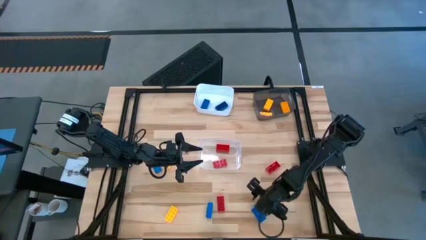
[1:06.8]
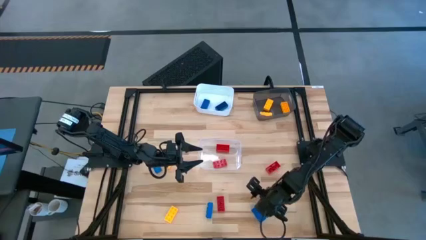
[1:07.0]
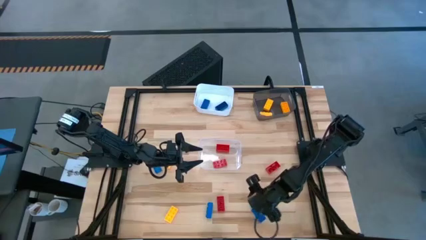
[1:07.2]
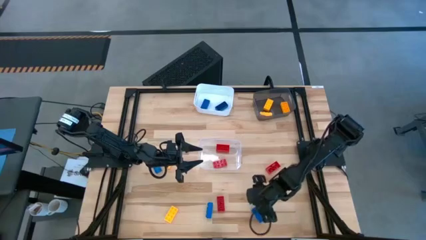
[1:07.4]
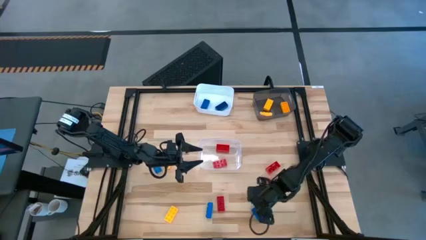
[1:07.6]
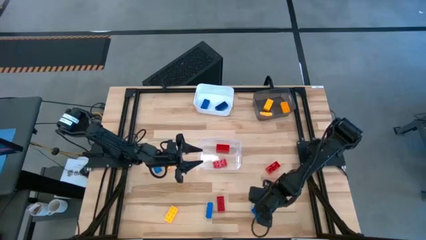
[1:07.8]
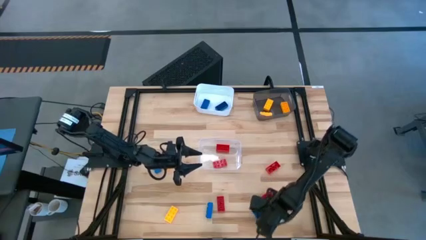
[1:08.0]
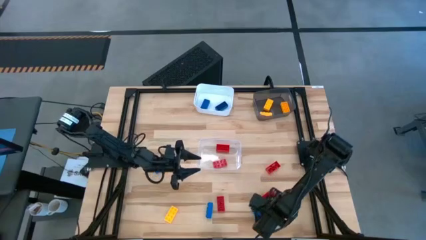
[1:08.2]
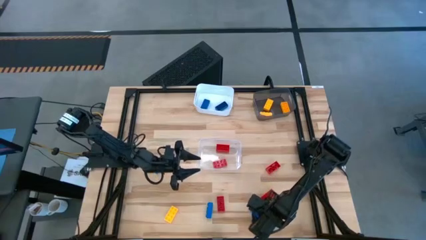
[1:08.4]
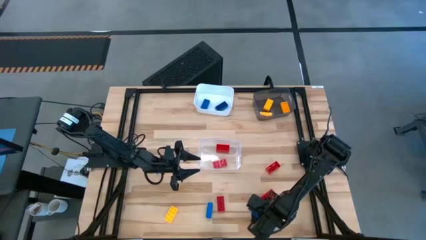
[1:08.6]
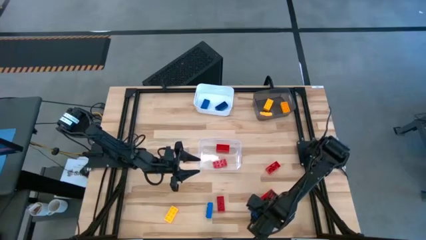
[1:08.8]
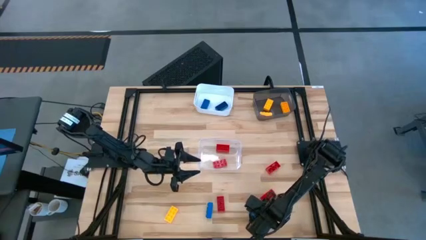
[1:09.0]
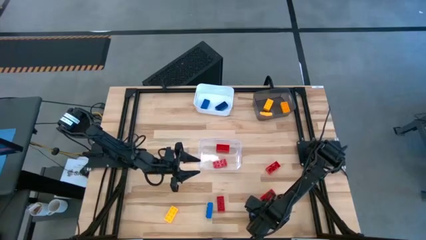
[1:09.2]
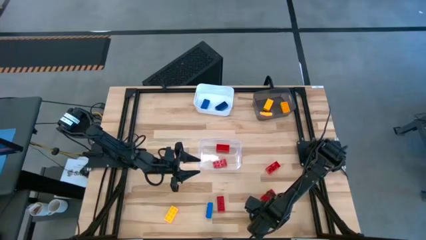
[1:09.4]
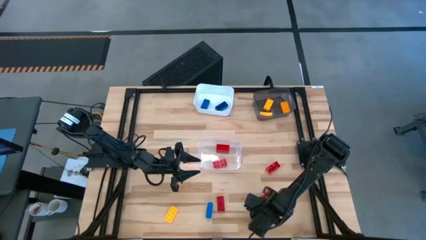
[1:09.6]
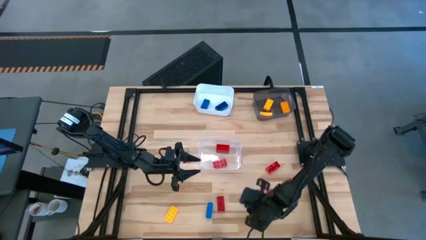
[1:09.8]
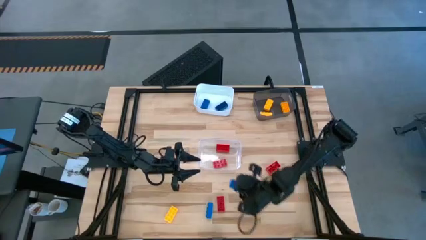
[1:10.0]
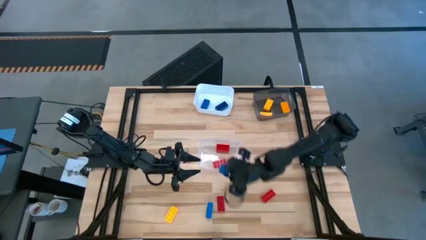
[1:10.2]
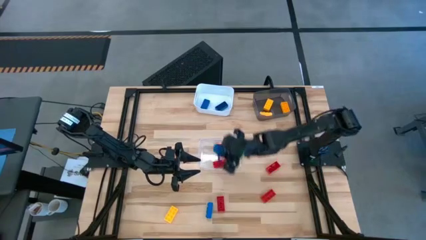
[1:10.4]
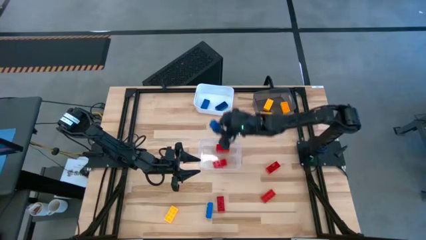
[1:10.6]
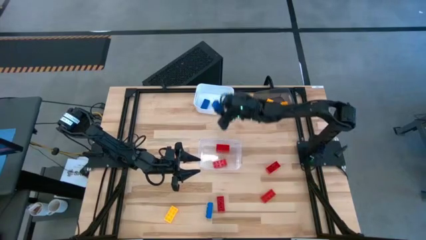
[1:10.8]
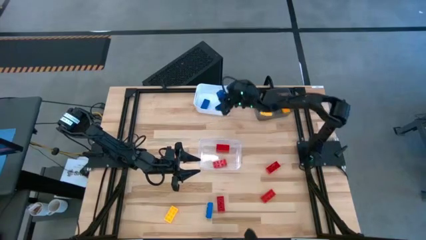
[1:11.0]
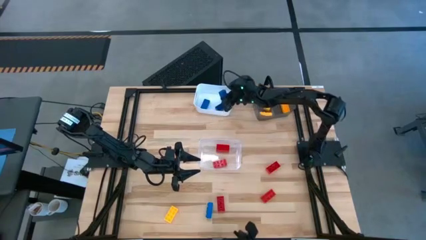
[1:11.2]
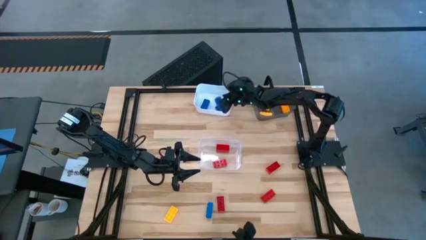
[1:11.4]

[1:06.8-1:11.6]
Task: Sort & place blocks by color
Put the bottom left blue block into the white bin

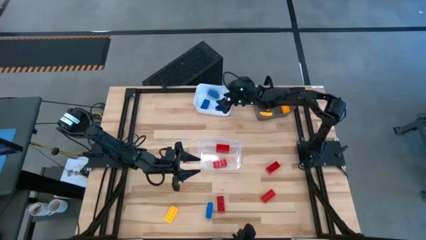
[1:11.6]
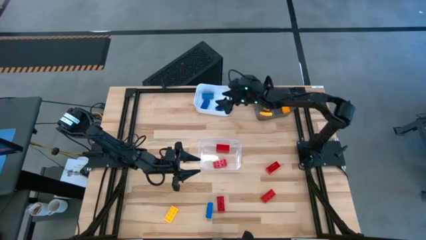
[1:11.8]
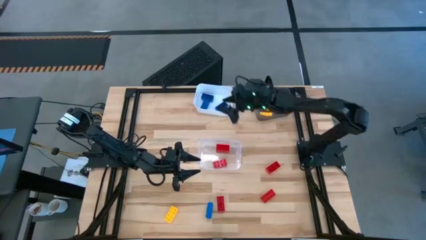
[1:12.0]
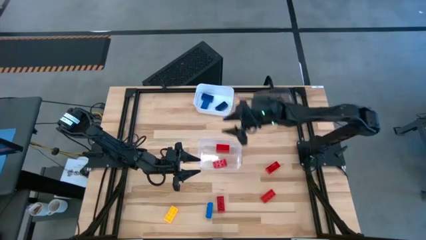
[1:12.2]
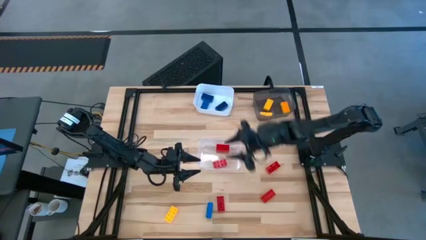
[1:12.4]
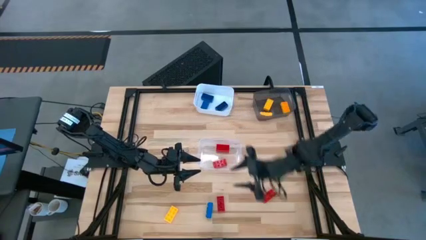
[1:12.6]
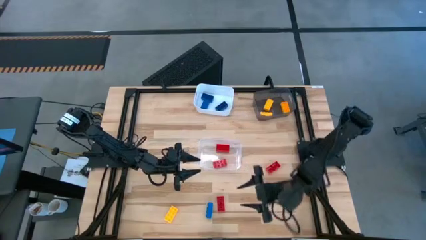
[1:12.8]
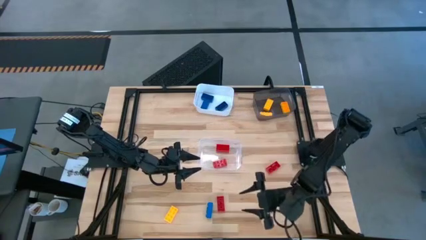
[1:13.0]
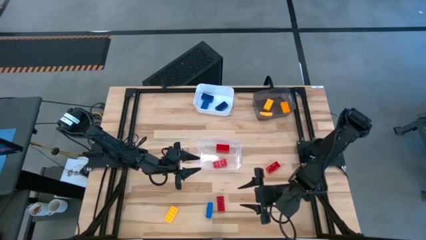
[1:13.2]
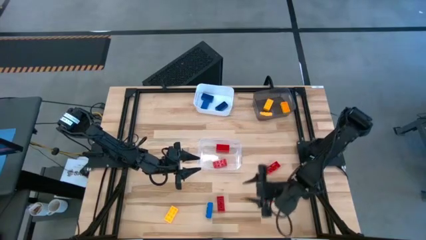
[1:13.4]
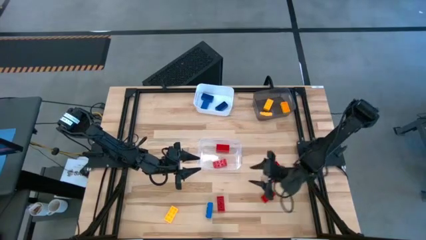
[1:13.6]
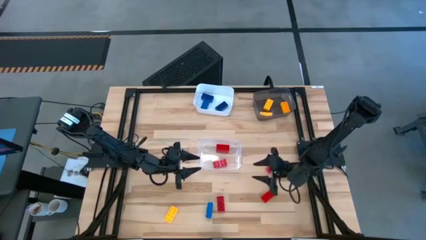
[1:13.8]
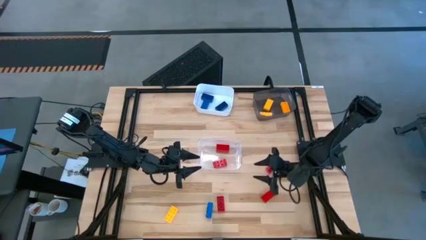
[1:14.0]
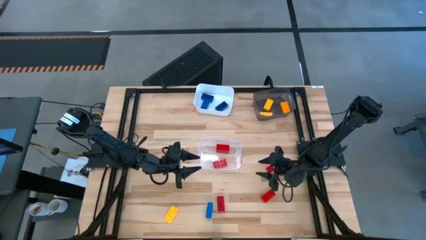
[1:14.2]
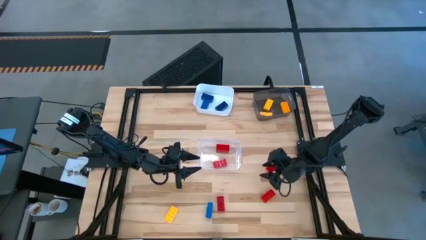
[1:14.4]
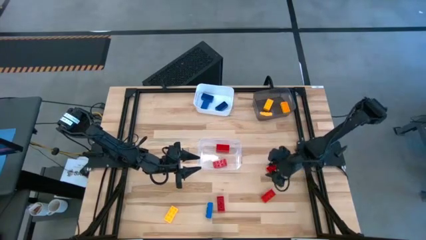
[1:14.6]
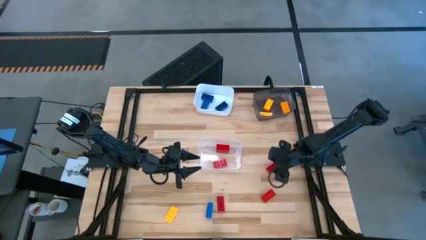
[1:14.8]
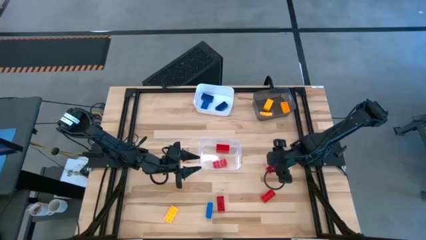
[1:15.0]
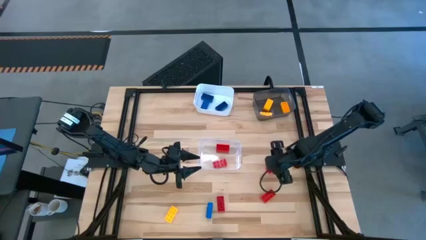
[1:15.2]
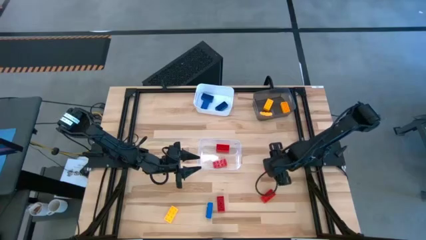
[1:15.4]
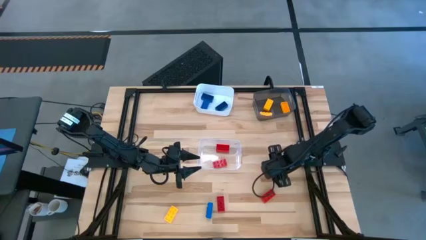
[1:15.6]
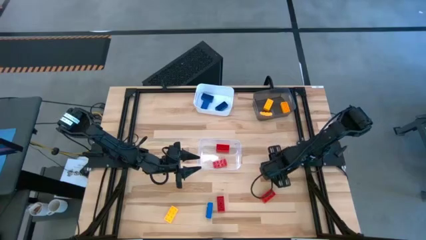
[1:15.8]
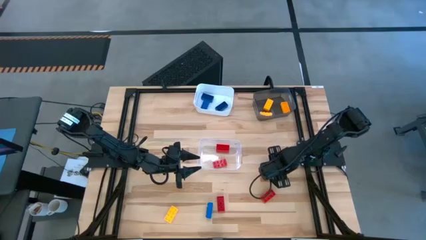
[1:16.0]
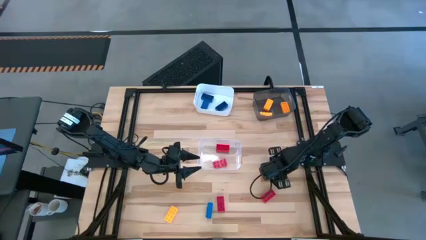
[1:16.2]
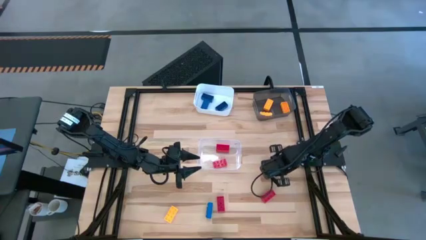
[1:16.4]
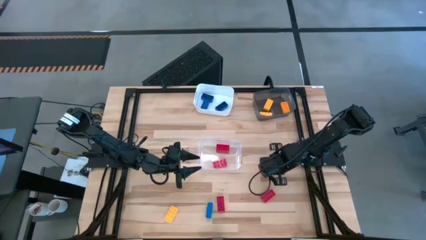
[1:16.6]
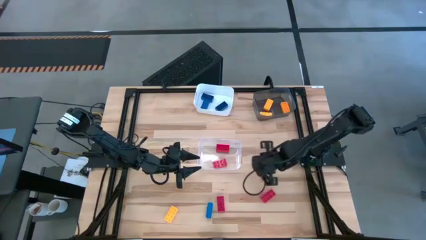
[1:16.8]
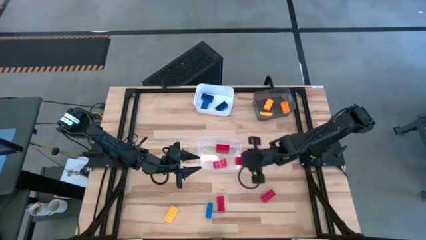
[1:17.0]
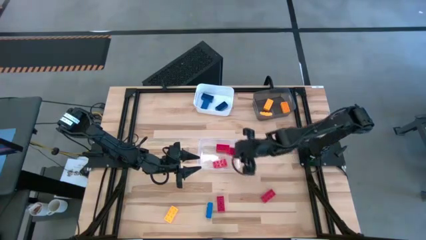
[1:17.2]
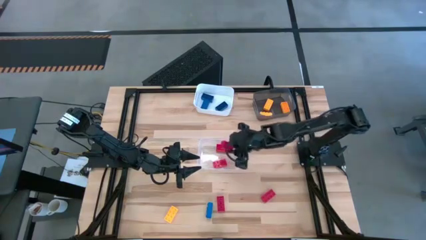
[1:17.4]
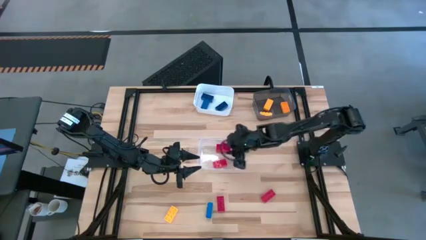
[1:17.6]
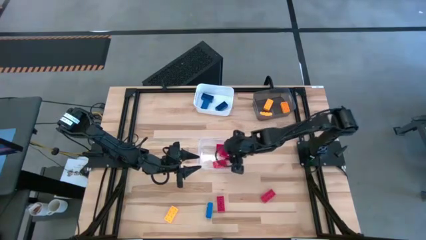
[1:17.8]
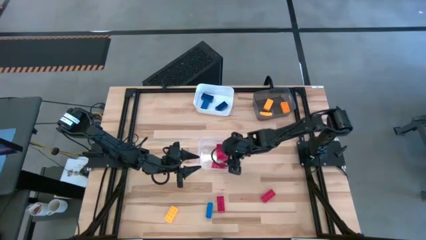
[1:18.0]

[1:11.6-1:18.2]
Put the top right red block into the transparent bin

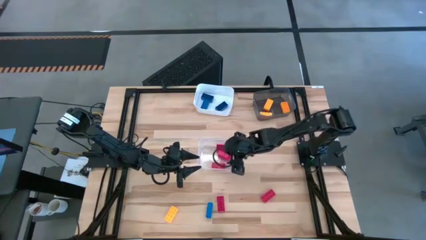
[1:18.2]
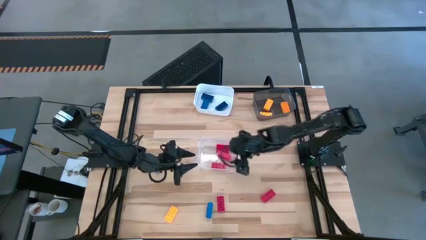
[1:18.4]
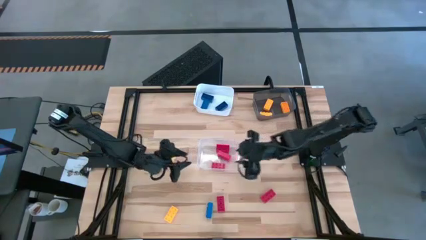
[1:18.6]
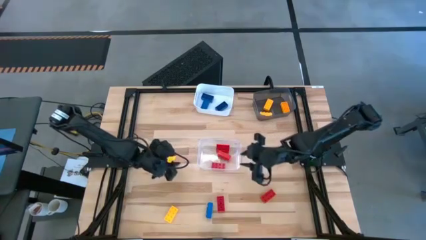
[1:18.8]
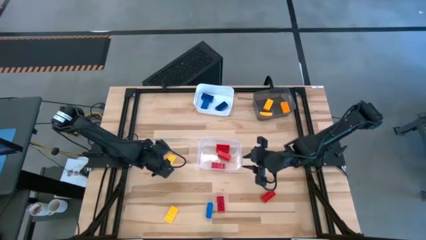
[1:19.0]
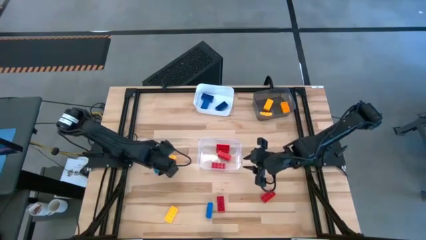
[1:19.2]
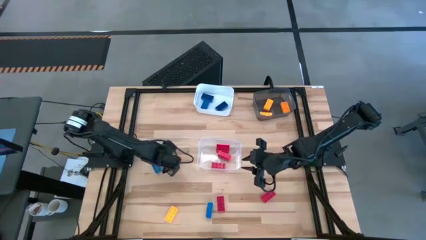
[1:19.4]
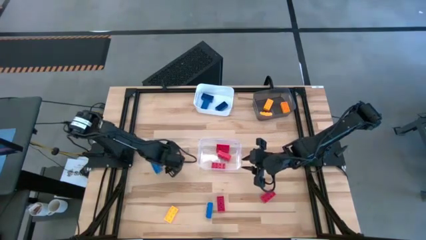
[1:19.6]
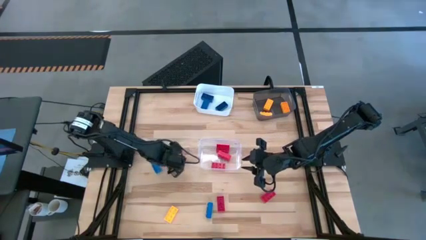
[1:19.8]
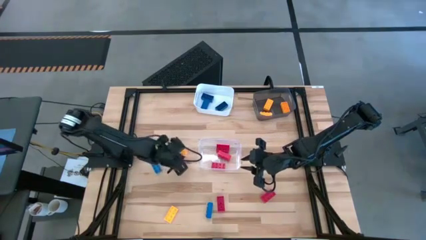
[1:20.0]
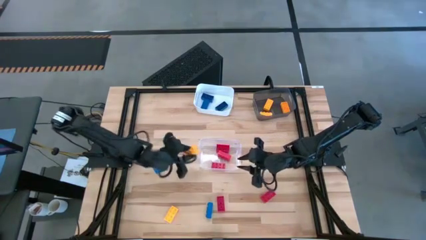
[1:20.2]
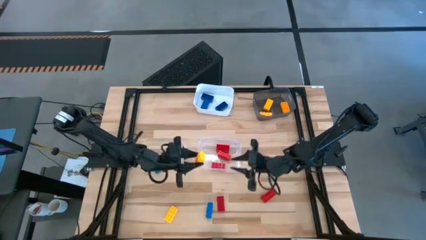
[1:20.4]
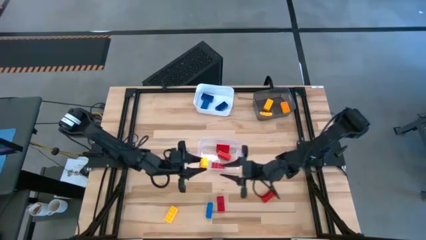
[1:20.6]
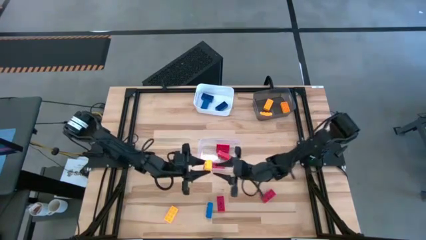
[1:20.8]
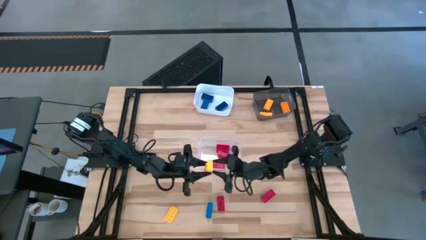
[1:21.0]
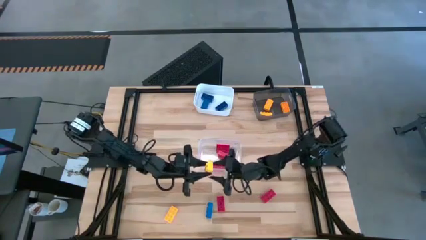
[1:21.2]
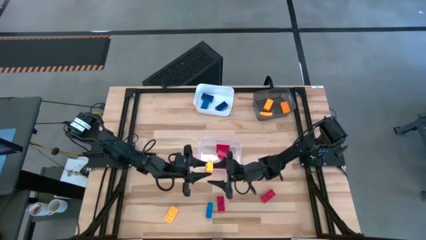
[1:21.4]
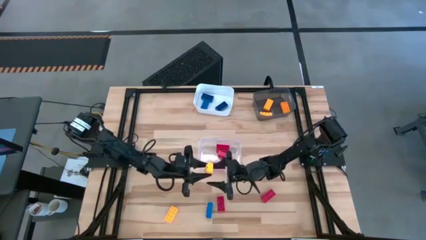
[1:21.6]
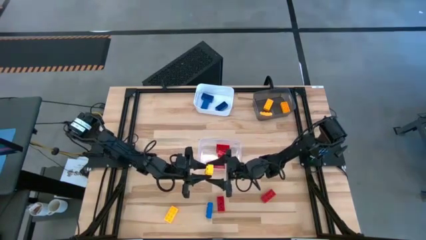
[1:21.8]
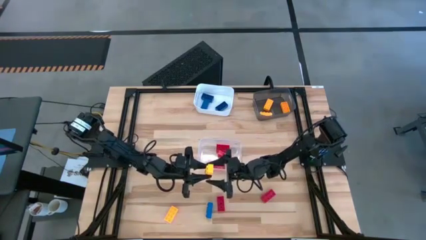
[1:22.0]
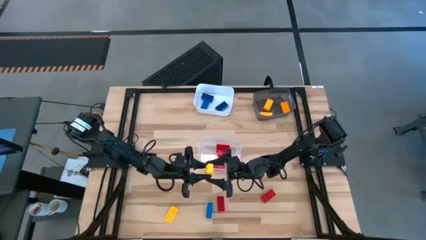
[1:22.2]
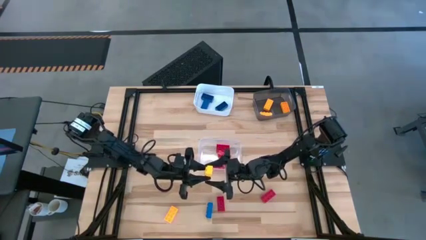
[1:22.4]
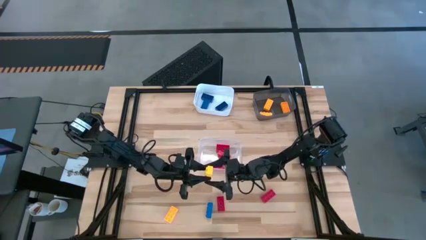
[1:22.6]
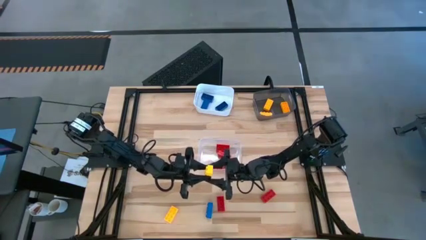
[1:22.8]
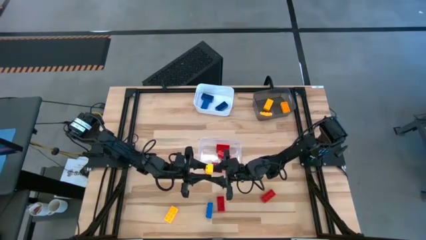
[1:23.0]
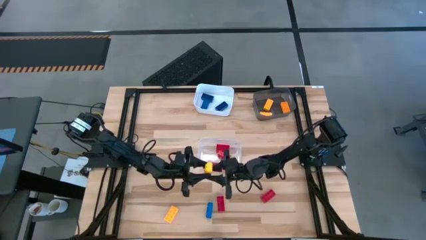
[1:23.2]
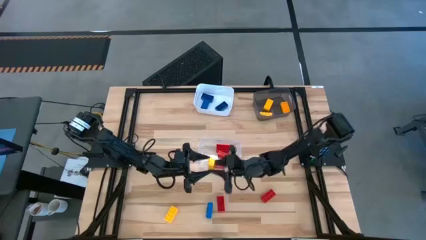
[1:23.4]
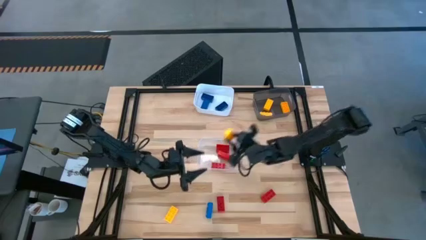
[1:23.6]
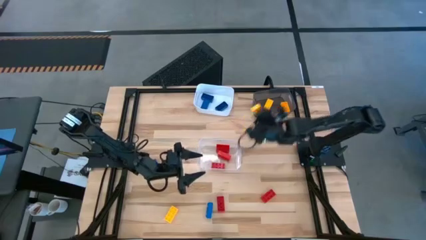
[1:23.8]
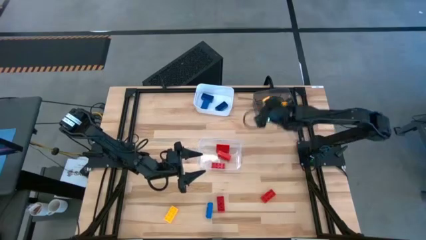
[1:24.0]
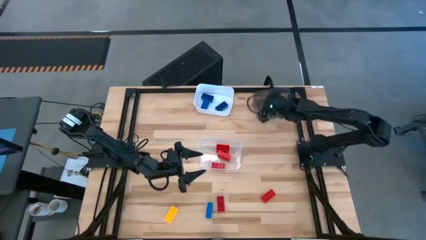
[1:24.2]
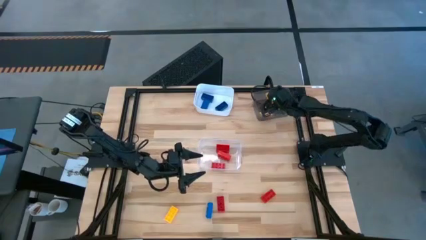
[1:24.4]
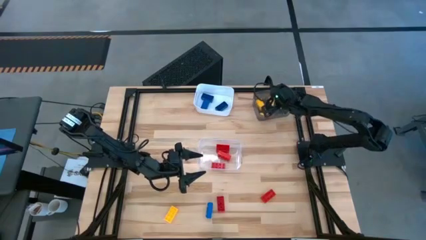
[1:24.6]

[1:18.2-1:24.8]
Put the top yellow block into the black bin
